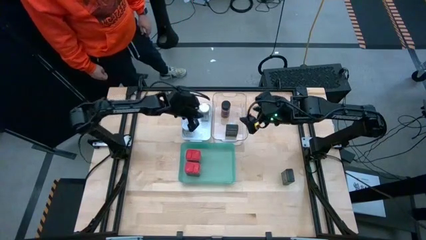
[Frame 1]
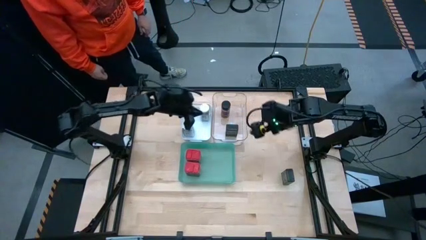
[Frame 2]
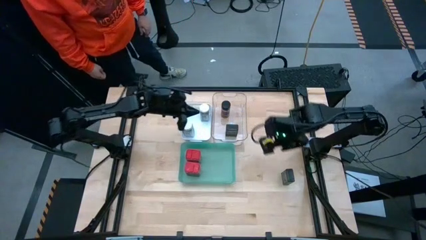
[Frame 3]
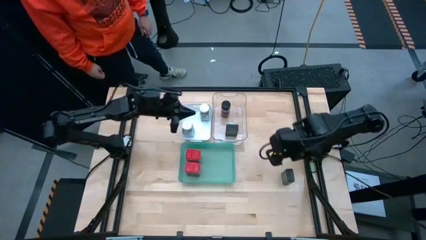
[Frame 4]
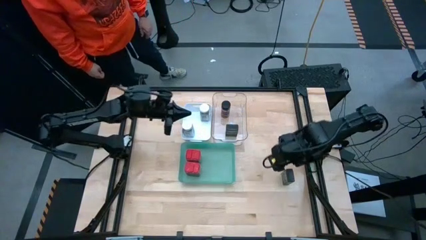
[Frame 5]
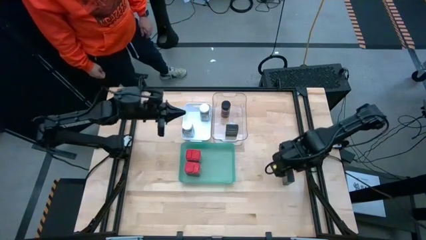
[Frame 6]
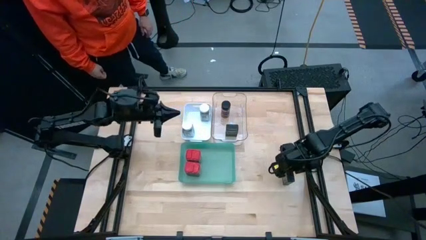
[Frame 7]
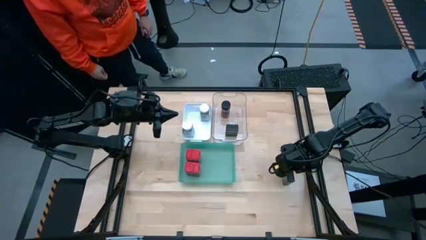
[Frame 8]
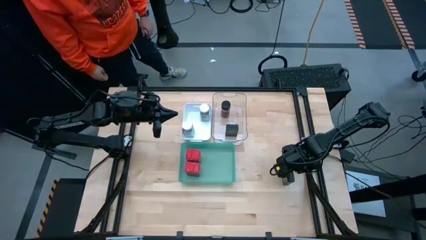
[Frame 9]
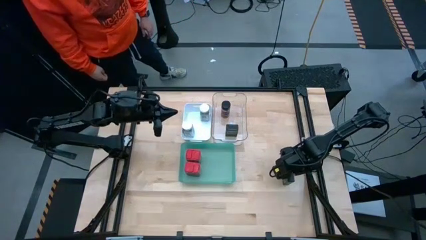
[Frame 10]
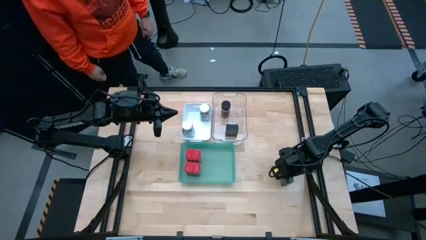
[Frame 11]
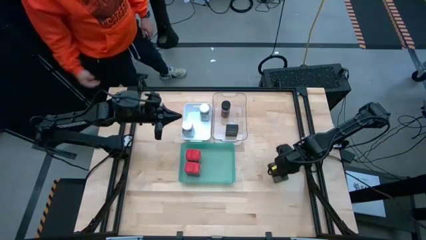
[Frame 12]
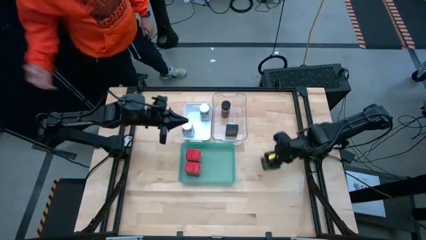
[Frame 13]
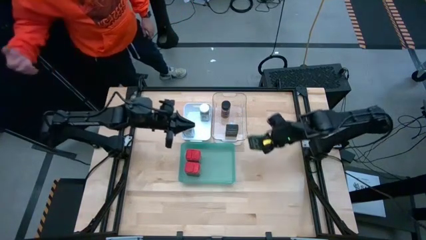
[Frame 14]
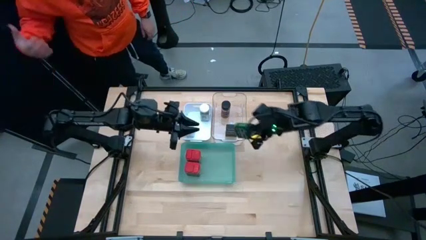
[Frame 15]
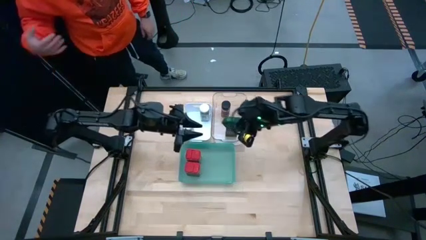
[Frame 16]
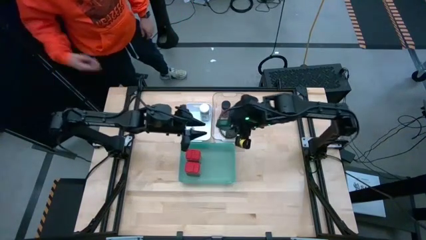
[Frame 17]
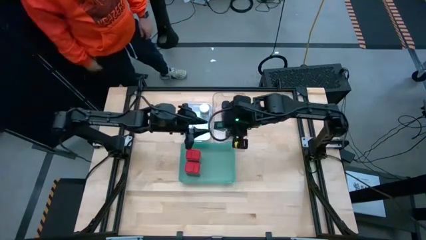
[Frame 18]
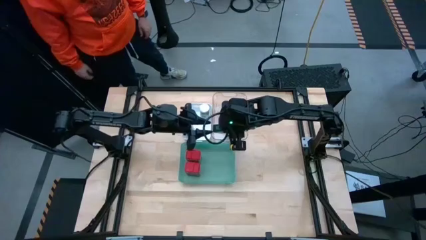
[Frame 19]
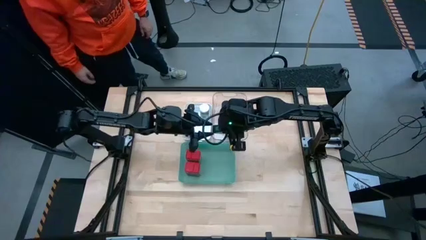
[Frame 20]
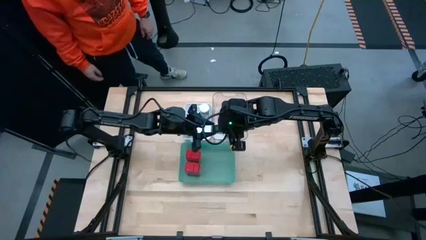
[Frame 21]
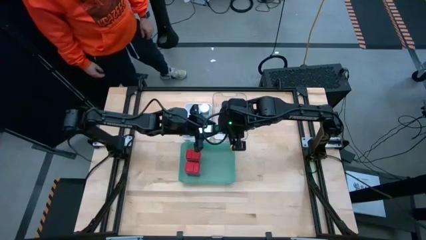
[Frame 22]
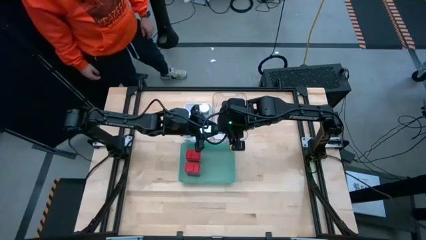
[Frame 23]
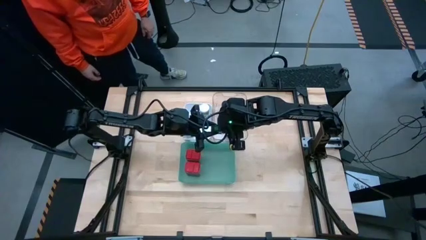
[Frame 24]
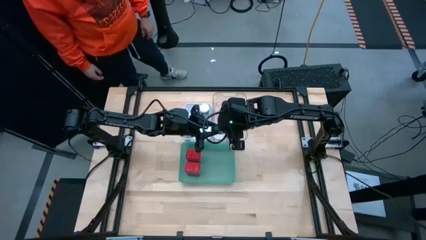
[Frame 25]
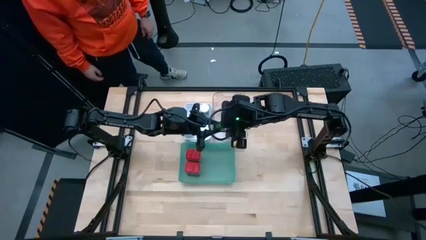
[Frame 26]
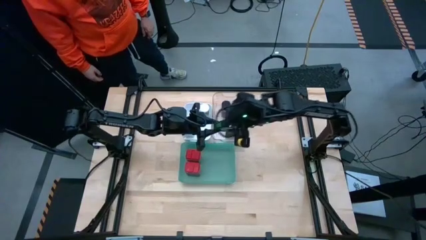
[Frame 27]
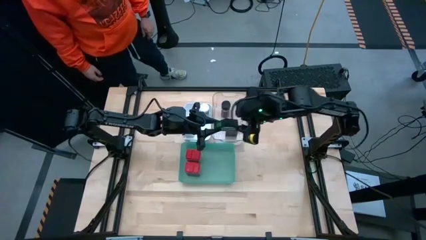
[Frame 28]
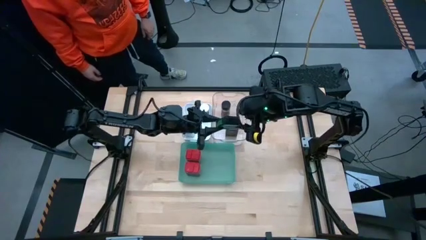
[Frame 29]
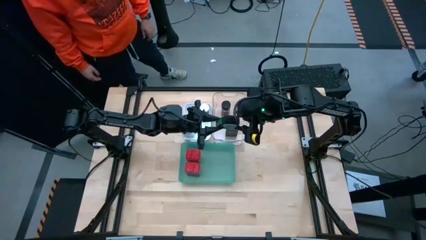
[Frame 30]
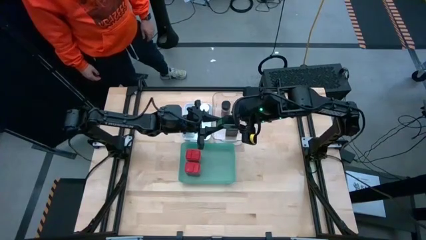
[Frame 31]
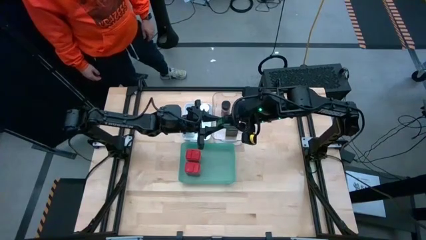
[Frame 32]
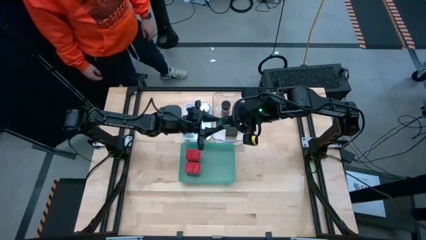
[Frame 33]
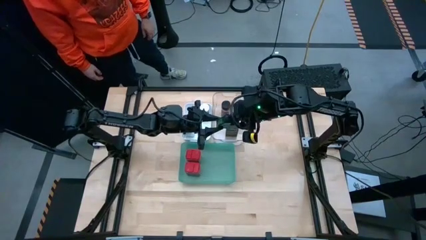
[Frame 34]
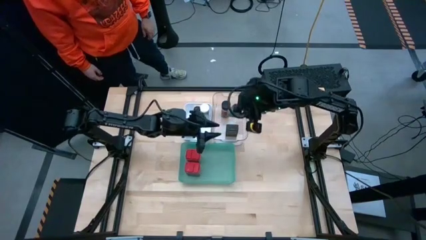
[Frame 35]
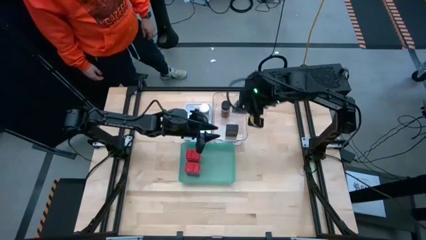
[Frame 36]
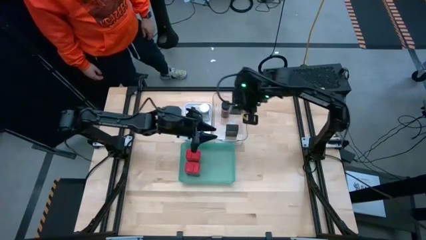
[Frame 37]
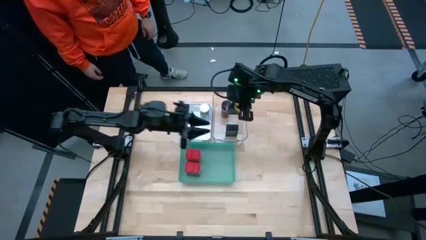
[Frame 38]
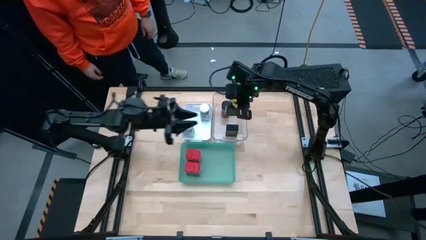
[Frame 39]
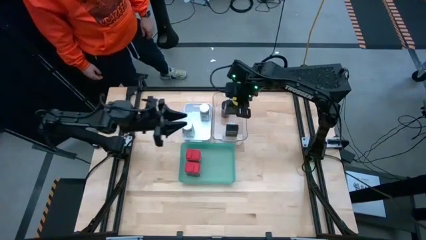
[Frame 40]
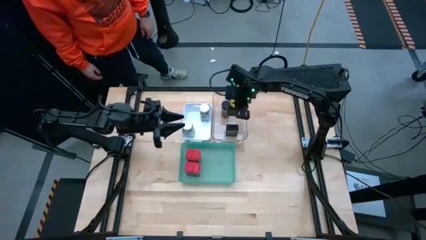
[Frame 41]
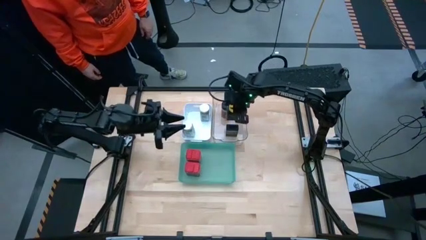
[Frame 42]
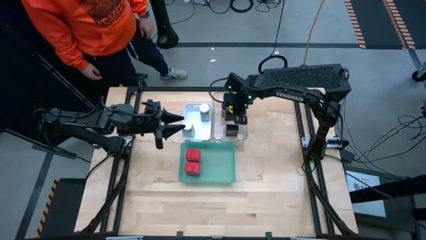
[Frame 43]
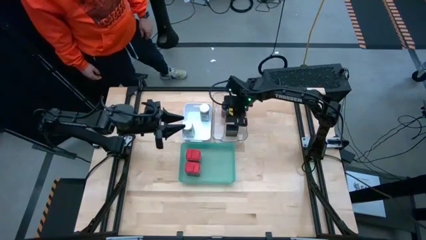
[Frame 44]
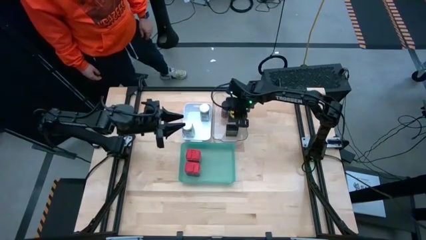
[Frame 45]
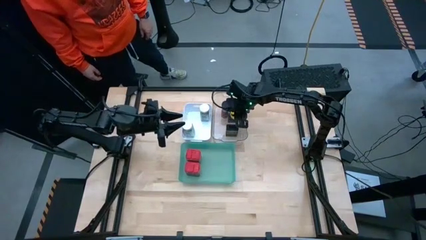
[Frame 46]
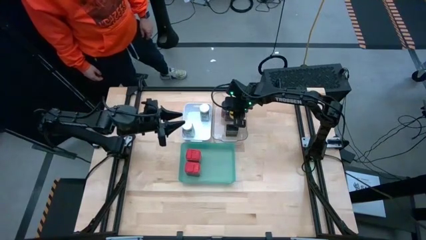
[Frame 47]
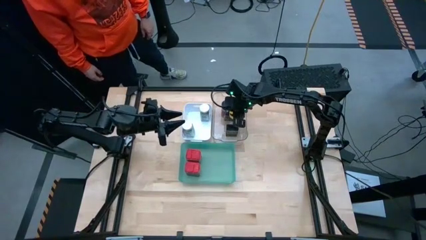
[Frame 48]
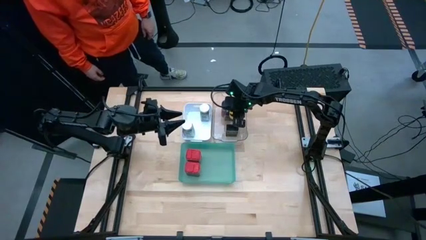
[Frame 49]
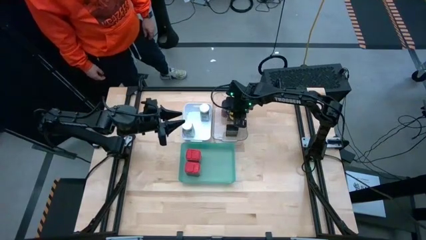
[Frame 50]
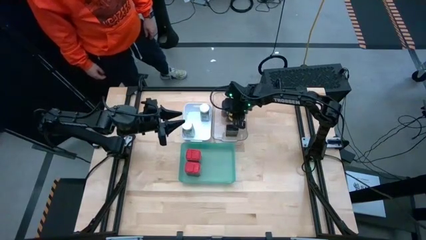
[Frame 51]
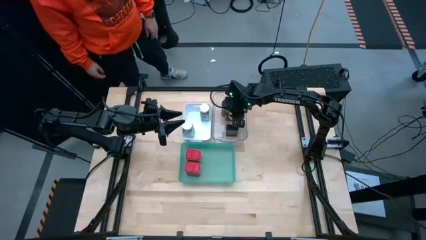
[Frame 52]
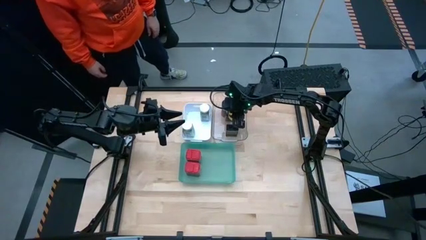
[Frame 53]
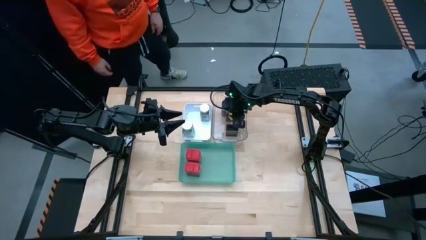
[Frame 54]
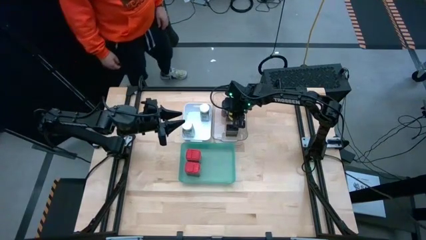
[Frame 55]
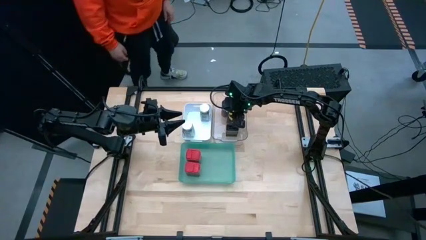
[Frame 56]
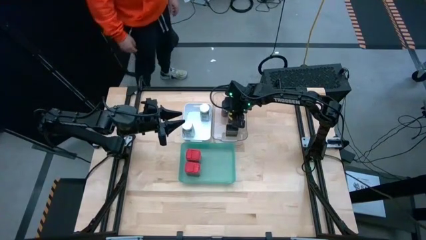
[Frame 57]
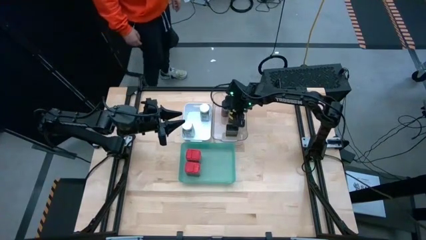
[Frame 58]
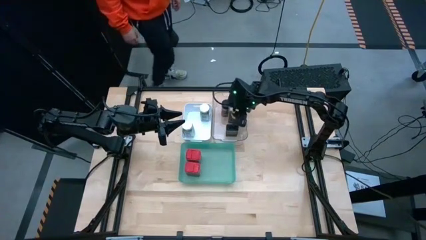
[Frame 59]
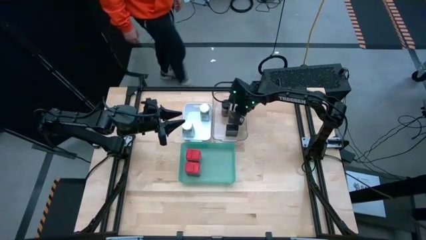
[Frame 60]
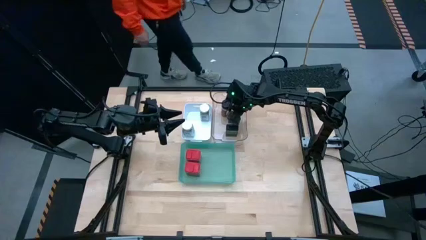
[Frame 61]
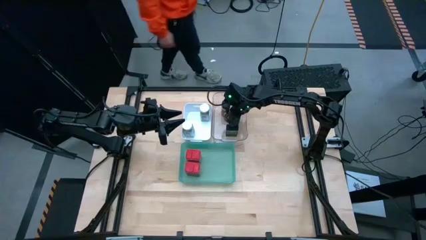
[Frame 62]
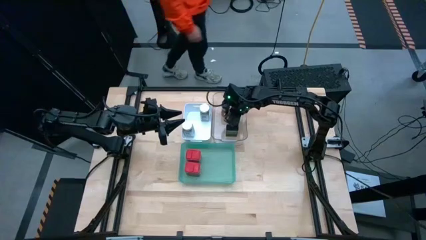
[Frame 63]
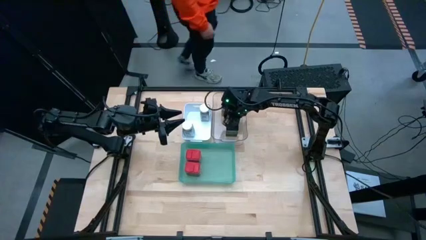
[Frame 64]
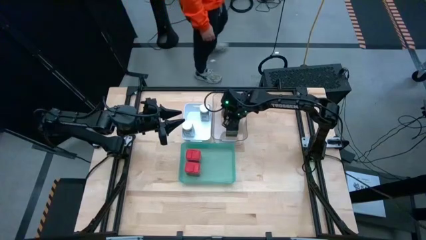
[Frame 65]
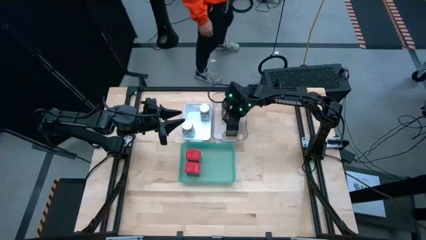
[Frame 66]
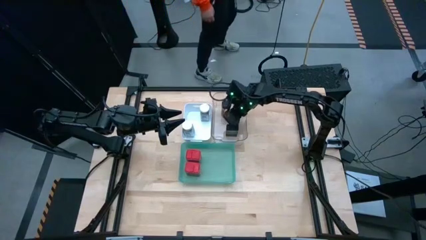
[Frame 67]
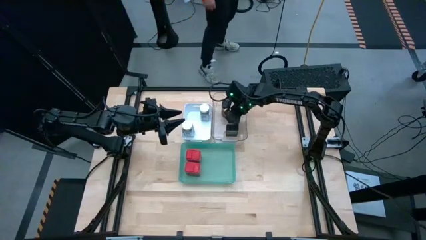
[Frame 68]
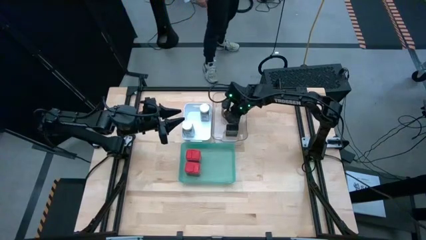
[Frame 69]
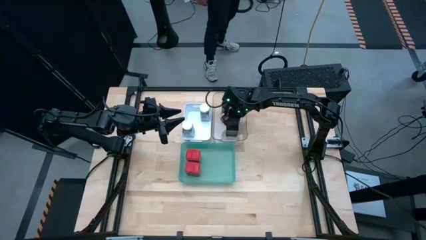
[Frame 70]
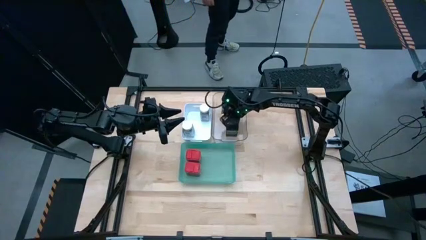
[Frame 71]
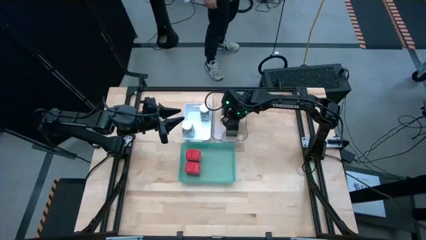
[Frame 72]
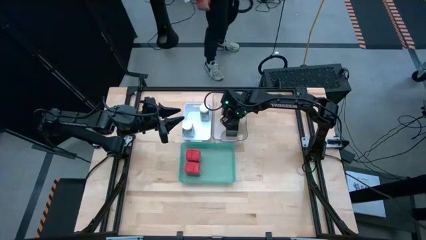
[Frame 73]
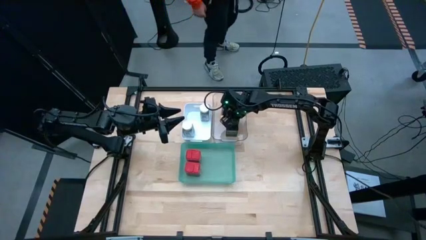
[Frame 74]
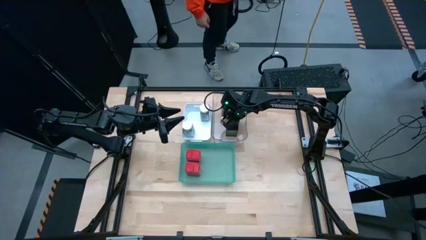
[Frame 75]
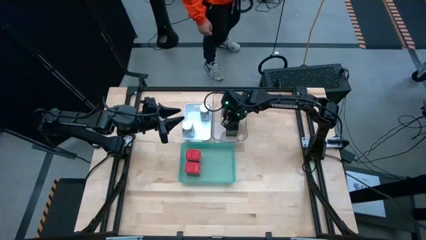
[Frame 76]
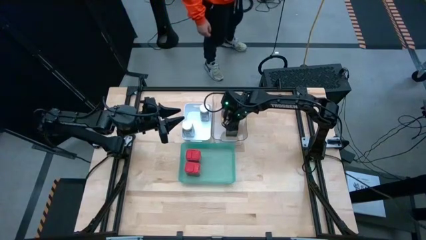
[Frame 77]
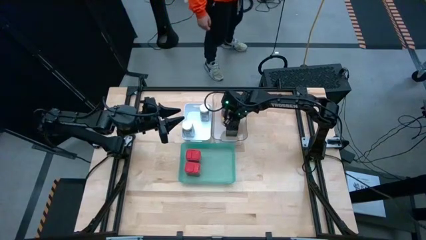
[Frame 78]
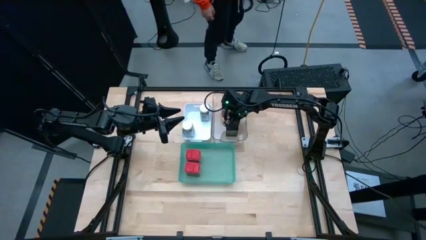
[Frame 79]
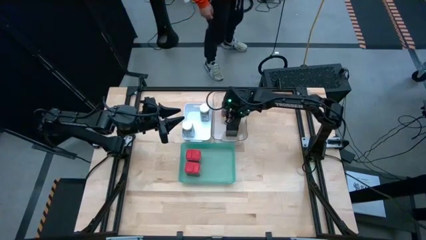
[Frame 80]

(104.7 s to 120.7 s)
Task: Sort spices by type
Put the black spice can into the transparent bin

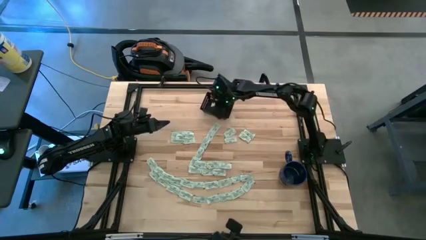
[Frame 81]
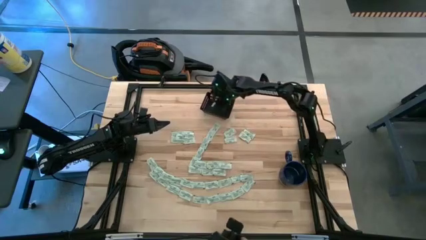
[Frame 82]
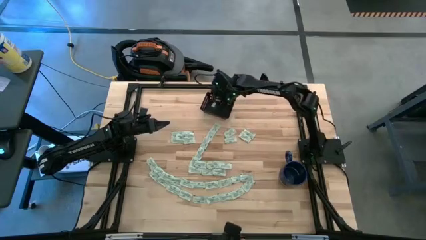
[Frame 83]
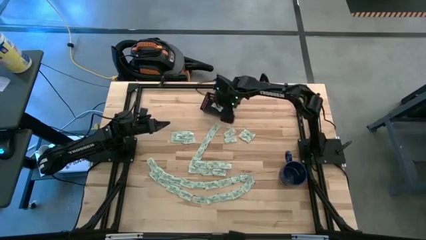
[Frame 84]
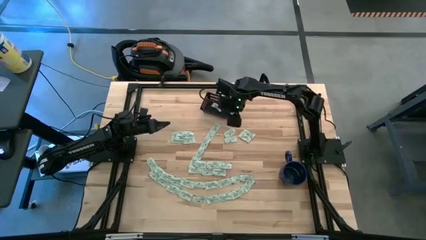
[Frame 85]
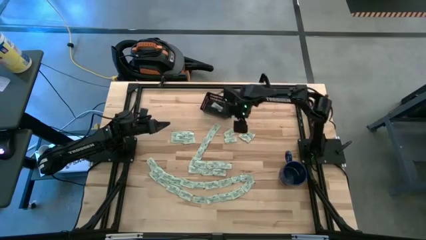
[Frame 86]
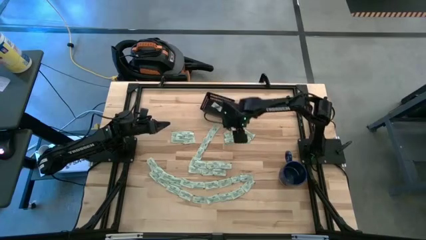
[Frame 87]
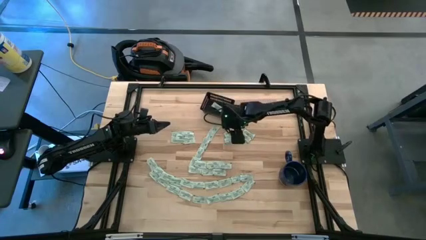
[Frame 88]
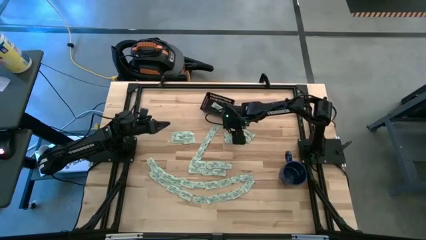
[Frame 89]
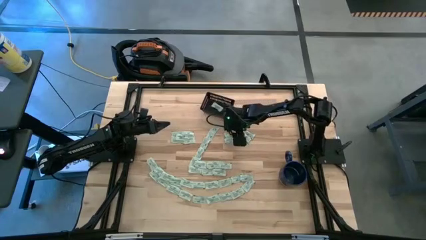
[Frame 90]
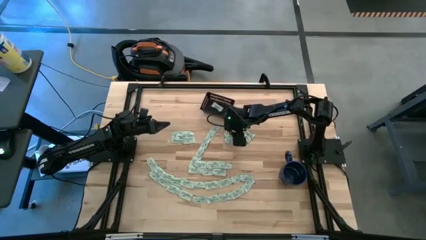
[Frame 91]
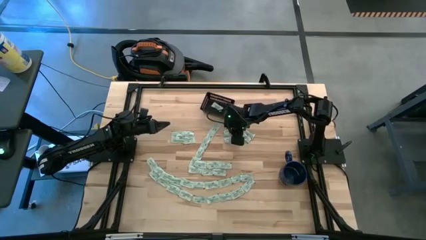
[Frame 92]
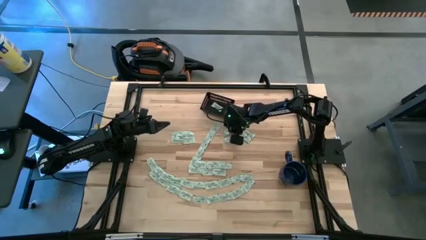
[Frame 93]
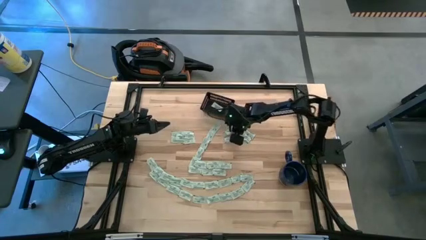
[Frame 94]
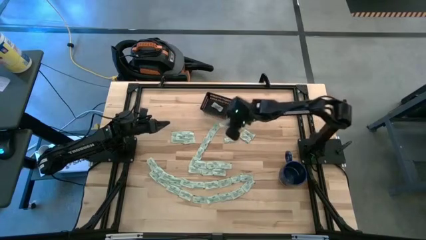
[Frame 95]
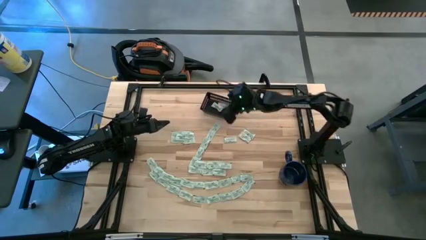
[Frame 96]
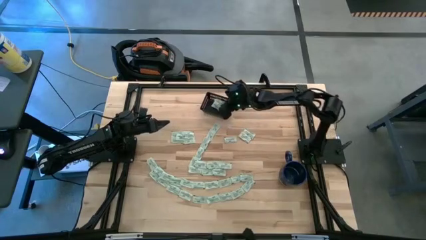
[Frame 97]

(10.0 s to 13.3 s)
Task: Pick and place Stevia / Truvia into bins
Put the stevia packet into the black bin
